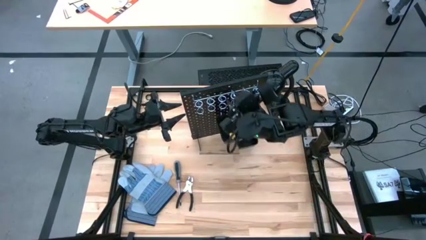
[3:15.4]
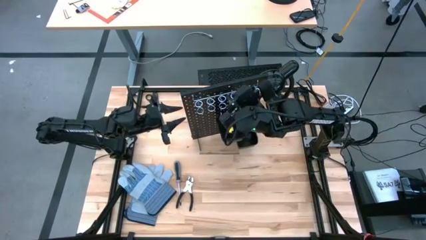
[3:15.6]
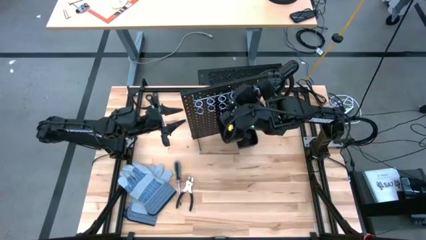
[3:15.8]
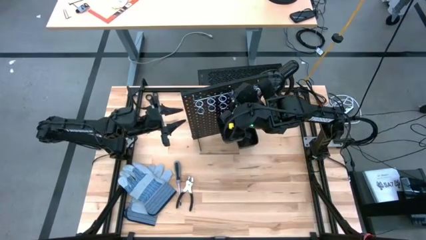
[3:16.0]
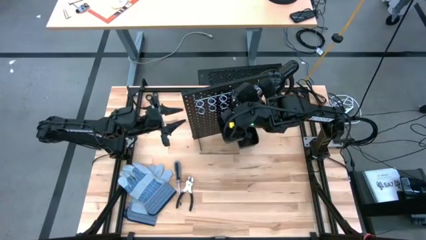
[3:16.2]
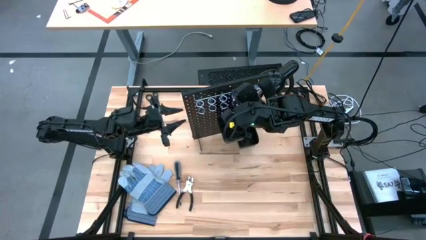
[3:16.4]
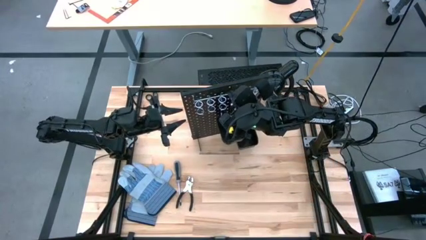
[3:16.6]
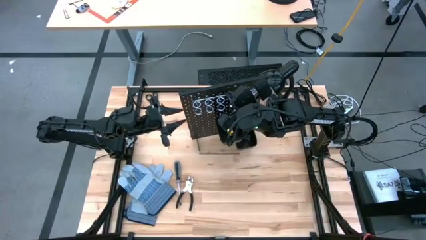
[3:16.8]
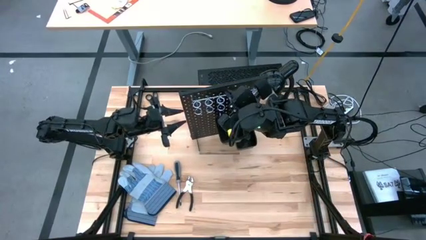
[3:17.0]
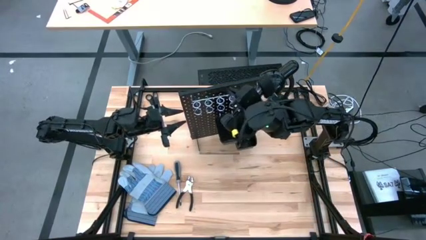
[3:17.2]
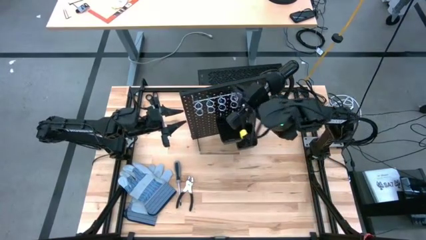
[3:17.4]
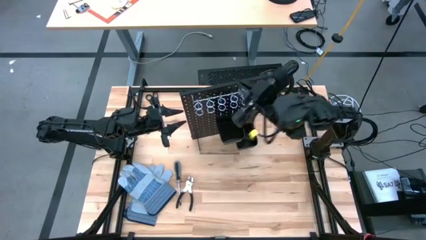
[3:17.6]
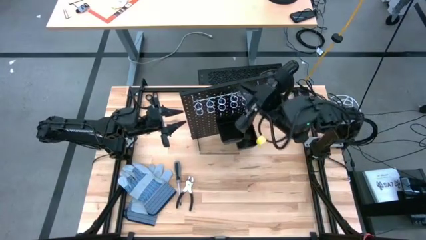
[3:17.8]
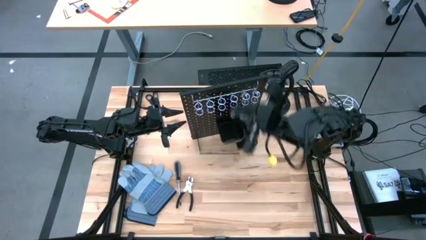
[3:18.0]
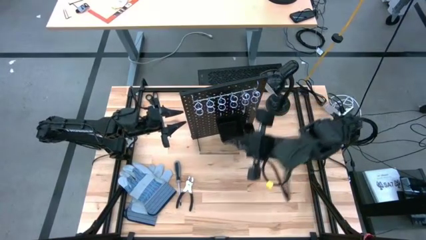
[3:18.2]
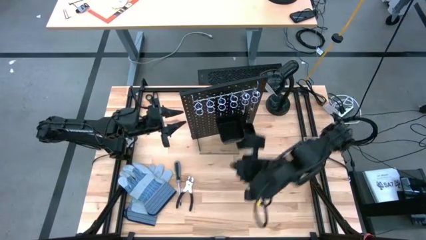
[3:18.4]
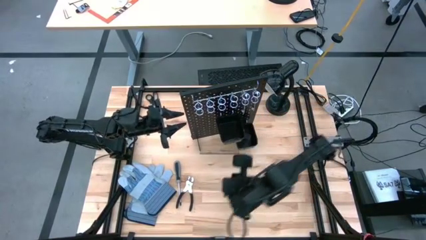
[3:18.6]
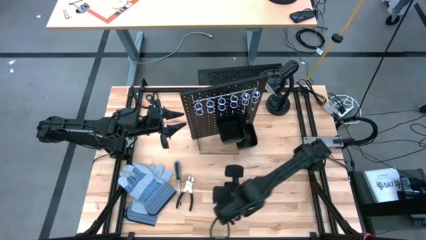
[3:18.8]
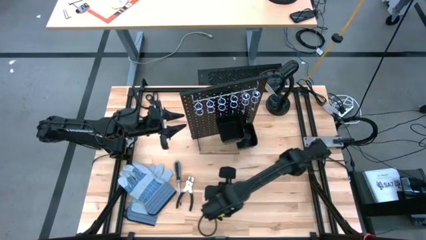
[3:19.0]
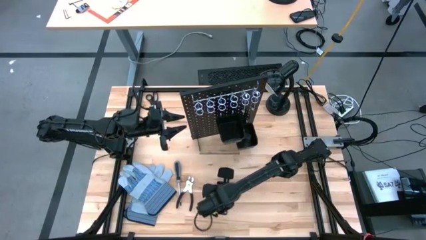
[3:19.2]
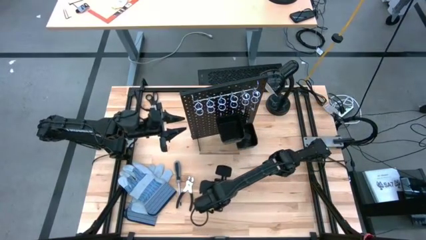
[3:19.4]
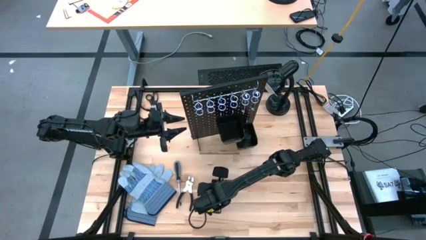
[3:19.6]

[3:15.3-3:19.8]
Task: Hang tools onto peg board
Remove the left silver wrench from the black pegboard

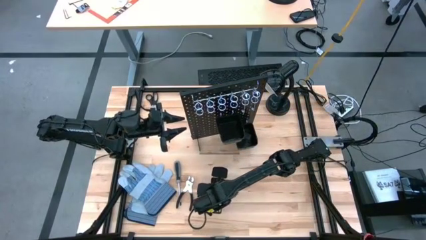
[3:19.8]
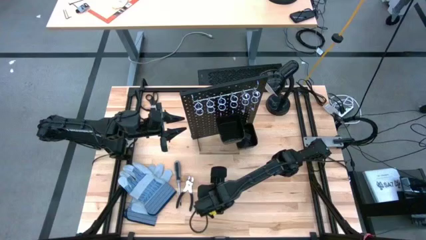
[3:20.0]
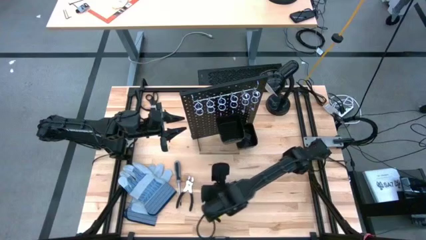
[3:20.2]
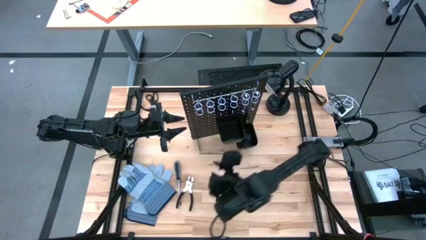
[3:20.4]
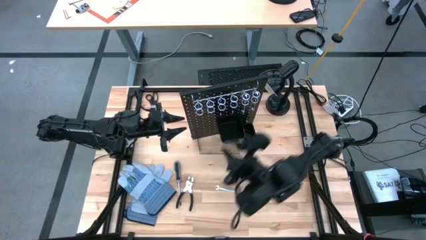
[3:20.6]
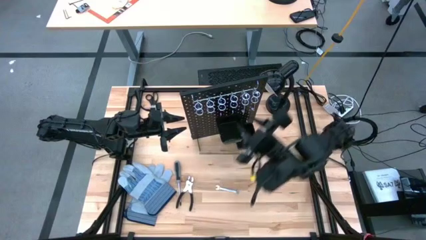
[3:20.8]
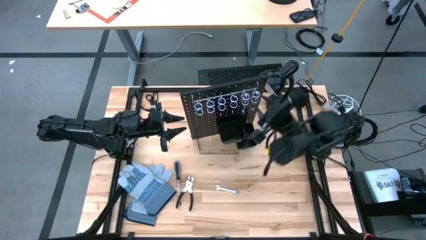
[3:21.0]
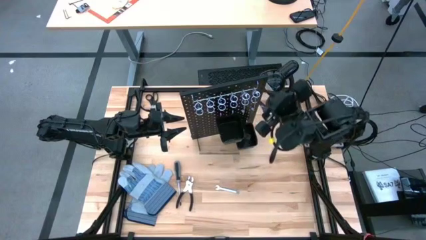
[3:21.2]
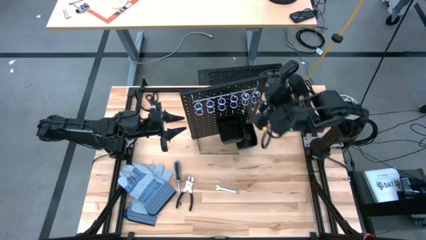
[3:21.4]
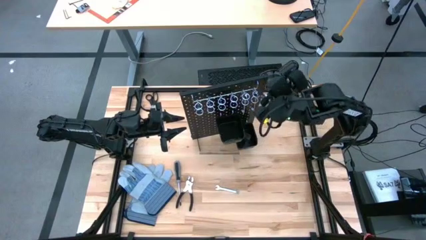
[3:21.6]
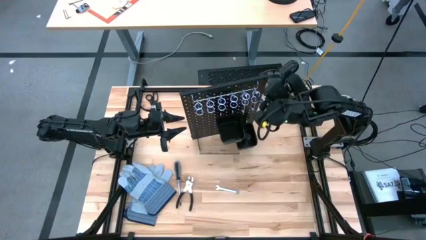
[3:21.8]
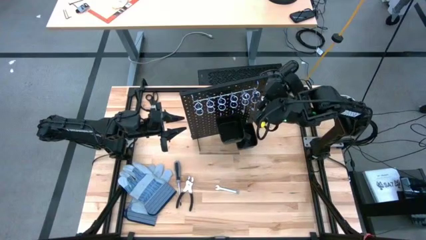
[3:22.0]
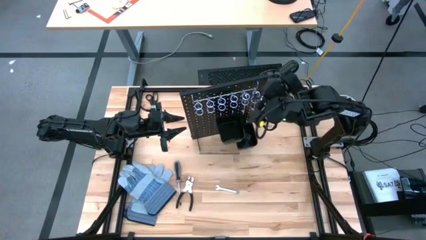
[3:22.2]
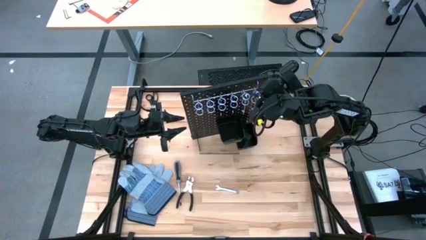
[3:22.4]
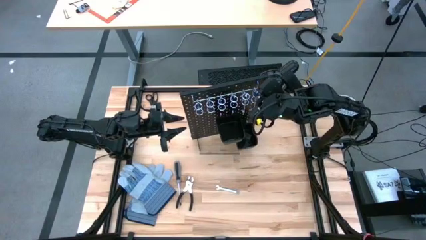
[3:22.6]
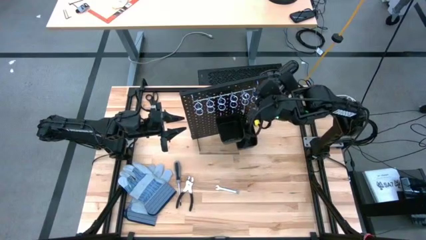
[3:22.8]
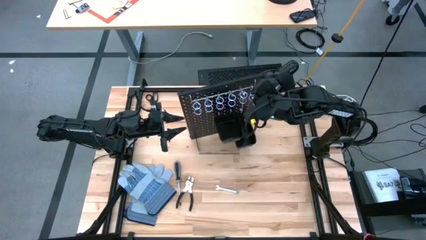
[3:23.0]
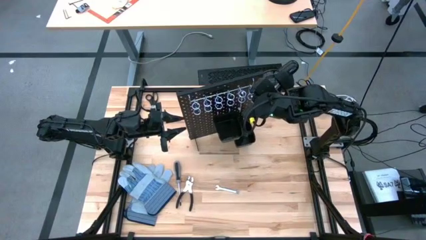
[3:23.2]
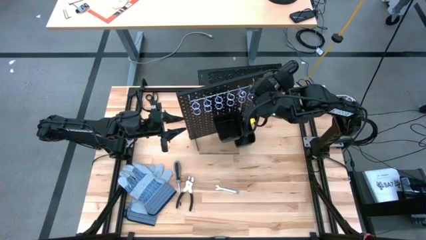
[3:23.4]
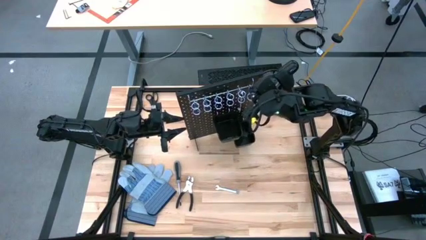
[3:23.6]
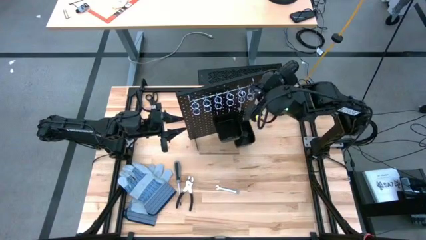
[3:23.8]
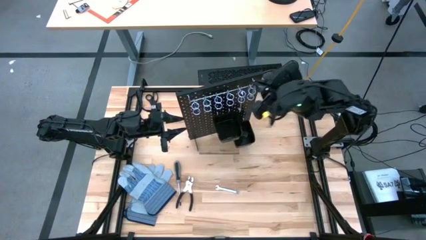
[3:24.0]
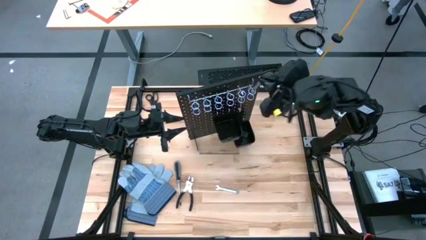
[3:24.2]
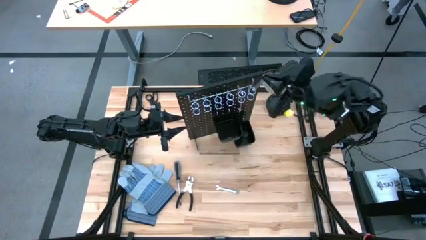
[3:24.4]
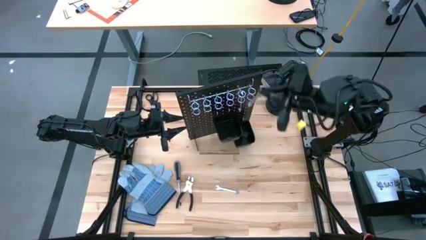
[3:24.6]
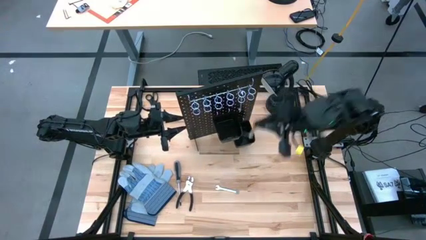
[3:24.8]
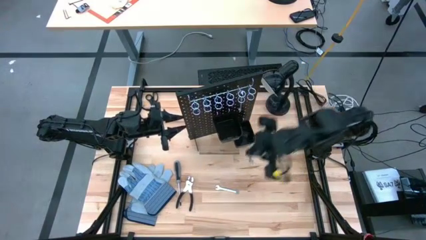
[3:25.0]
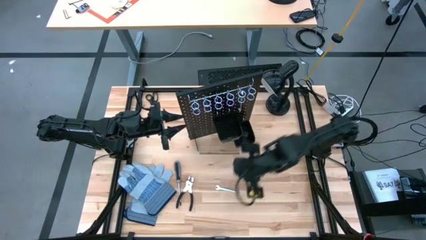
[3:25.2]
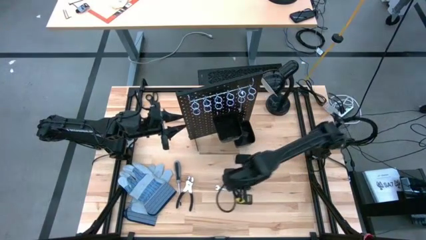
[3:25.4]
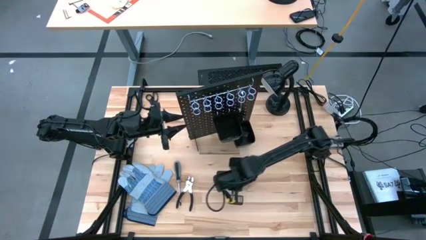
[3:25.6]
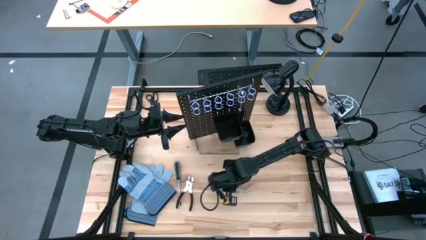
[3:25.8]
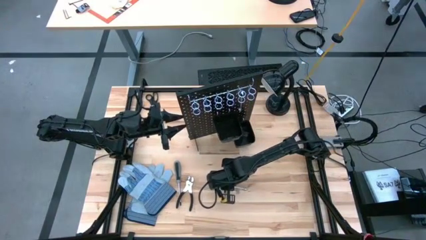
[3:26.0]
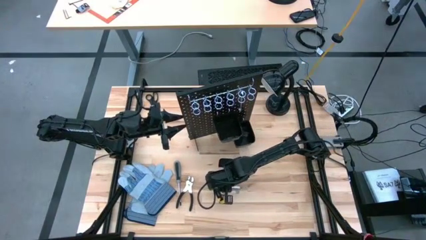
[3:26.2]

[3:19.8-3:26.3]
Remove the right silver wrench from the black pegboard

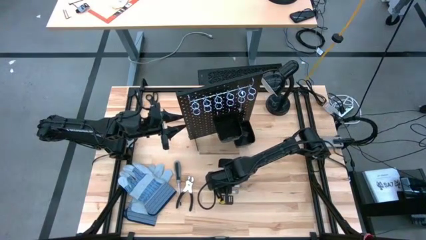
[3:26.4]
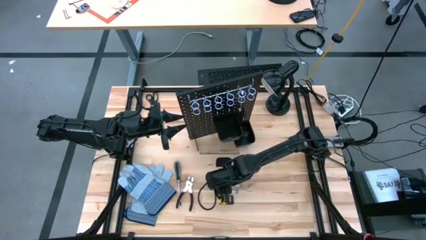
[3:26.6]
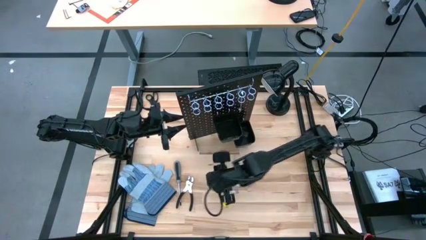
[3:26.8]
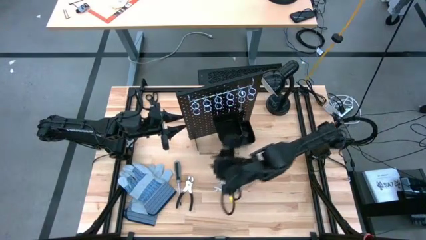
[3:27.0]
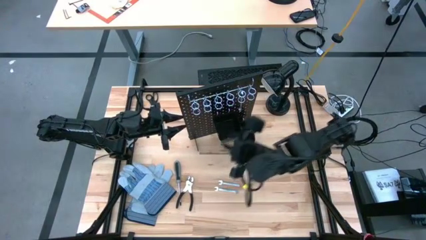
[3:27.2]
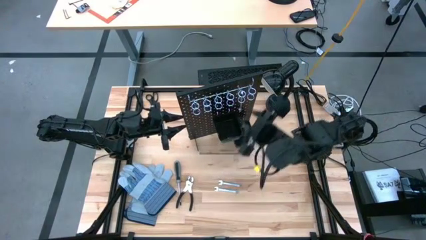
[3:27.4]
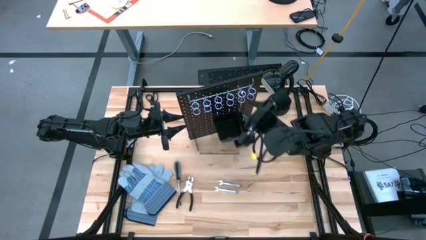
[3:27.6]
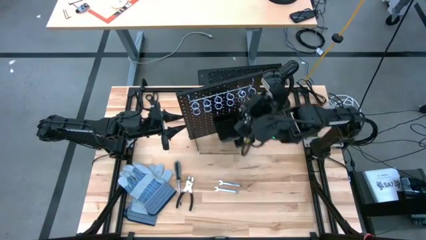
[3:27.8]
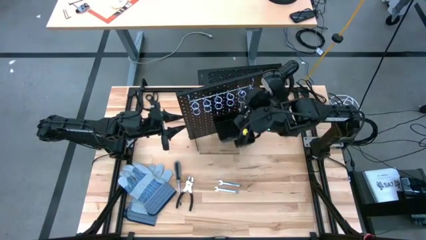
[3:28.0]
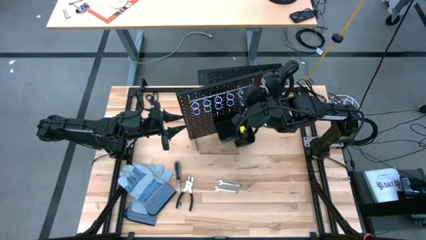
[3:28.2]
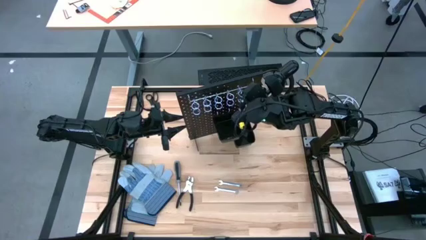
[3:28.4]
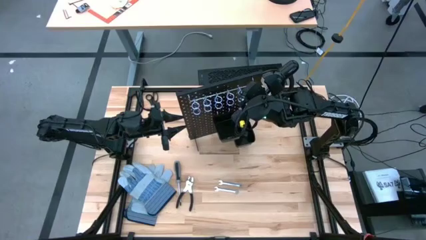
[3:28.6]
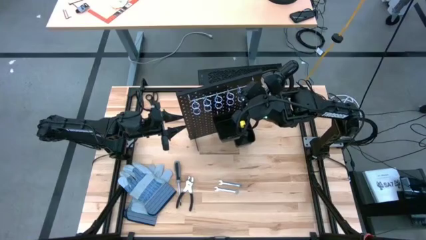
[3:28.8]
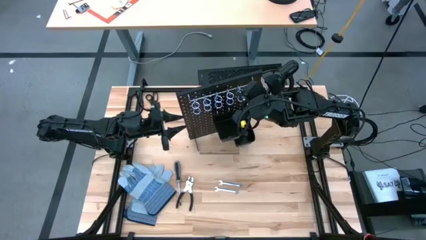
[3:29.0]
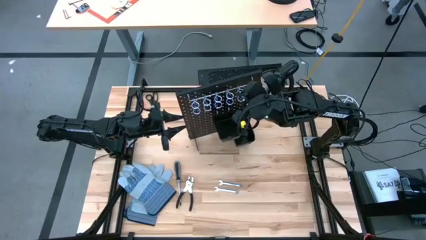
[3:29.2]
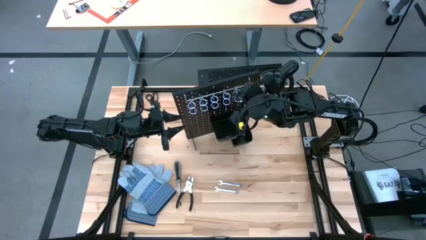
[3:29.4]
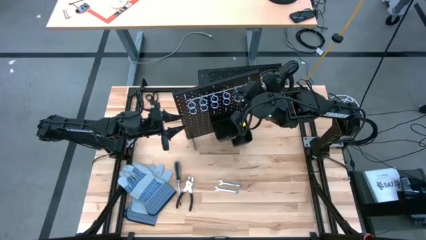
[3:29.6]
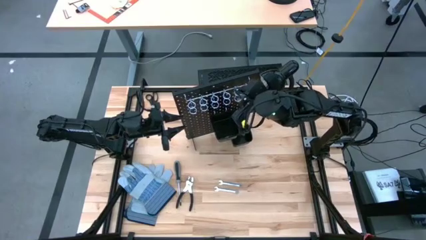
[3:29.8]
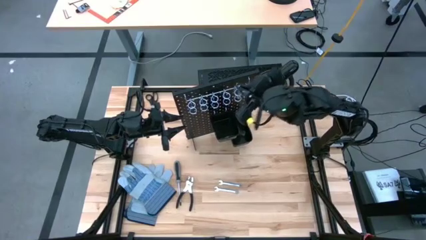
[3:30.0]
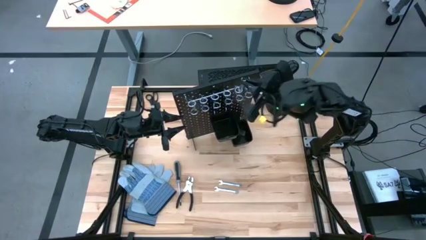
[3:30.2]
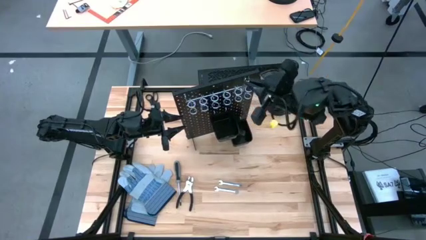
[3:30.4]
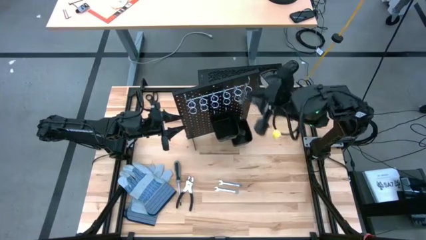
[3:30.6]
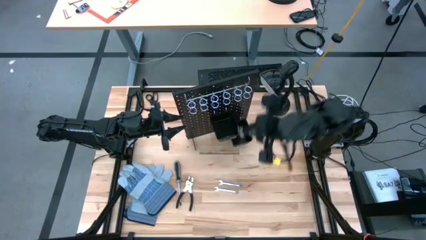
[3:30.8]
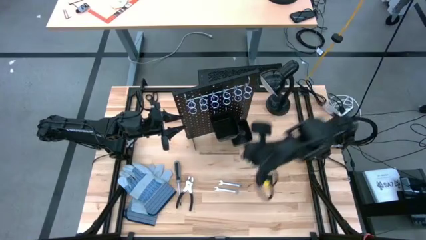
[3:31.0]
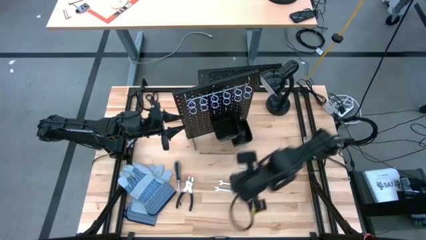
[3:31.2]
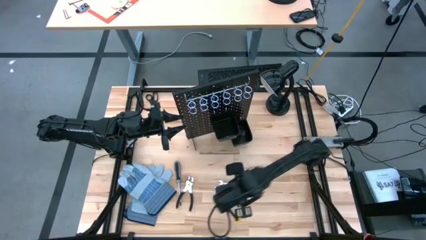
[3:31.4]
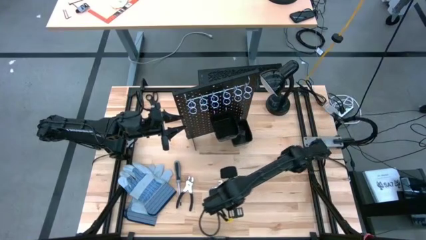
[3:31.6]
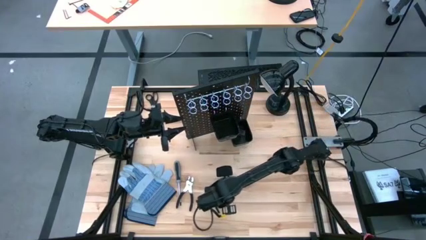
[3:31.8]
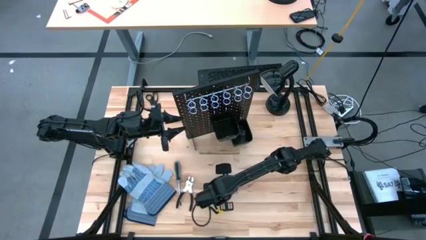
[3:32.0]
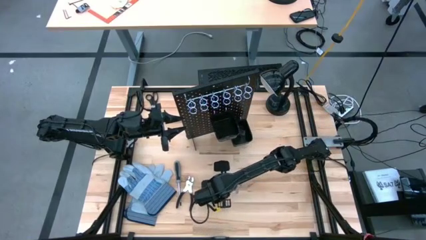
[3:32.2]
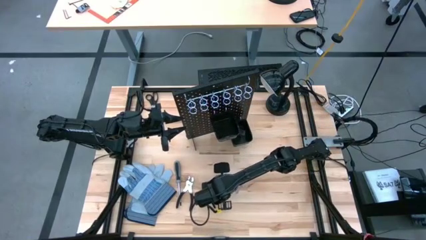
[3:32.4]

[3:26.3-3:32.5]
Remove the silver wrench from the black pegboard
